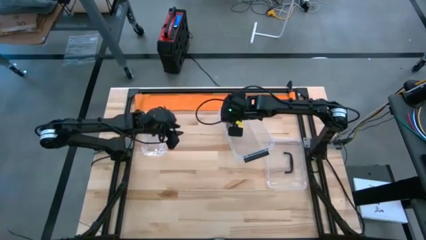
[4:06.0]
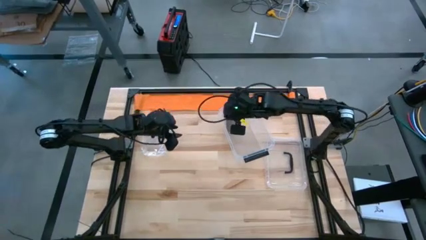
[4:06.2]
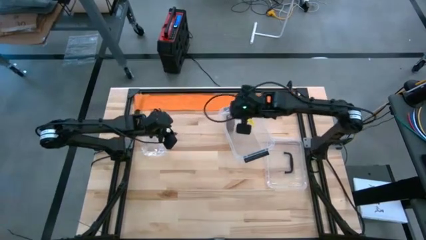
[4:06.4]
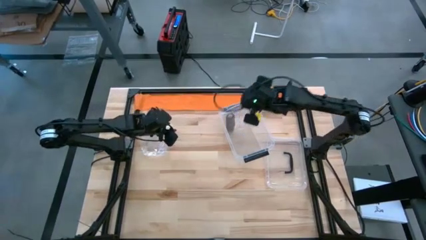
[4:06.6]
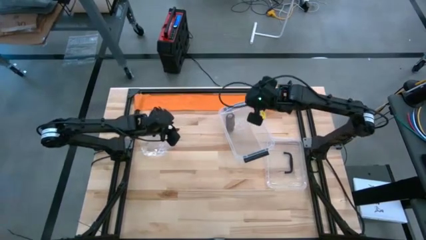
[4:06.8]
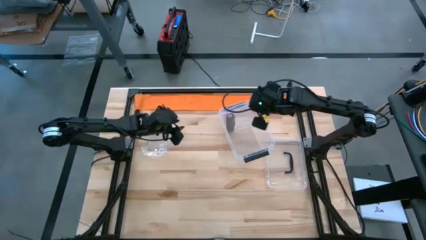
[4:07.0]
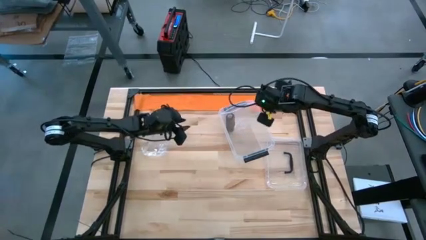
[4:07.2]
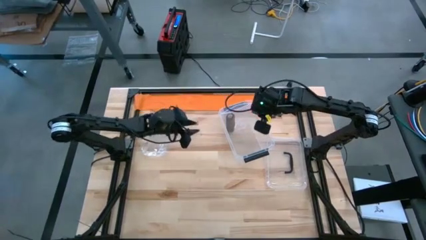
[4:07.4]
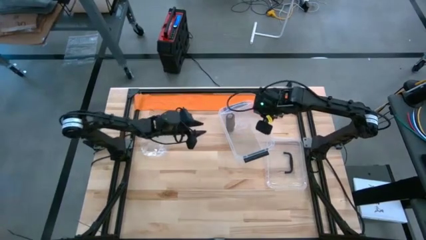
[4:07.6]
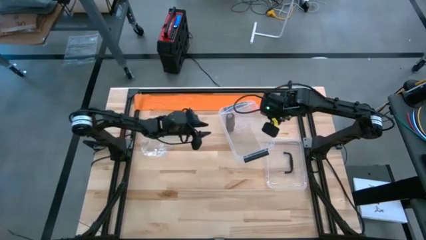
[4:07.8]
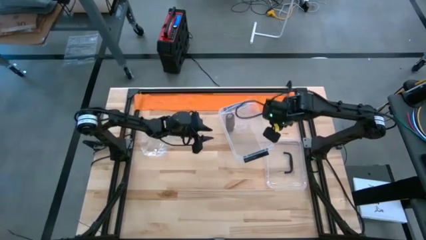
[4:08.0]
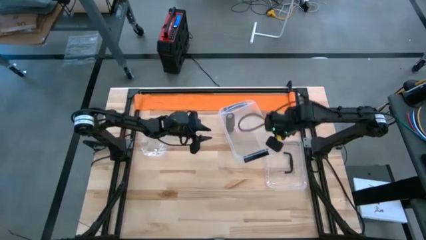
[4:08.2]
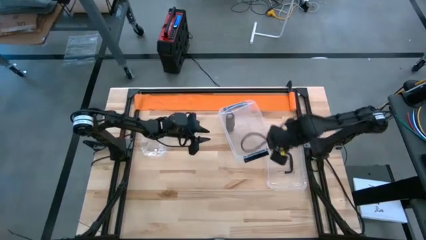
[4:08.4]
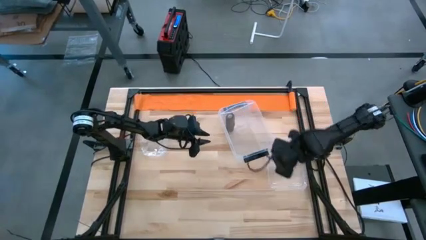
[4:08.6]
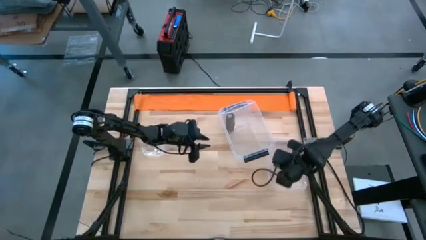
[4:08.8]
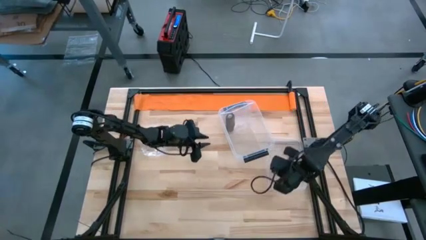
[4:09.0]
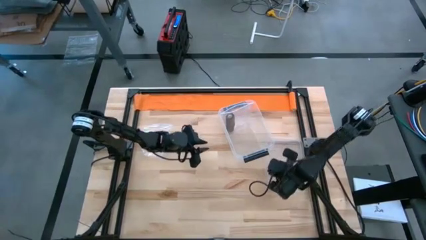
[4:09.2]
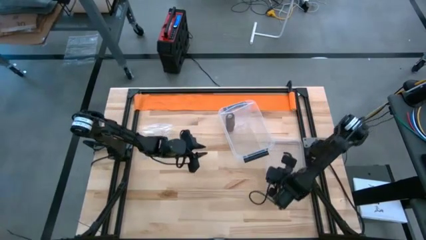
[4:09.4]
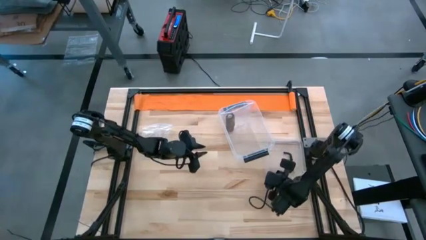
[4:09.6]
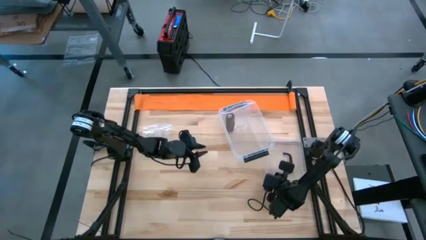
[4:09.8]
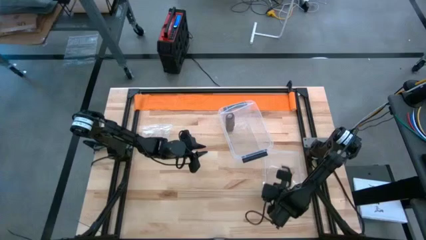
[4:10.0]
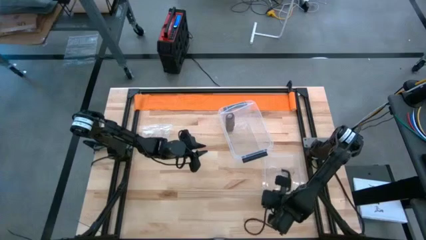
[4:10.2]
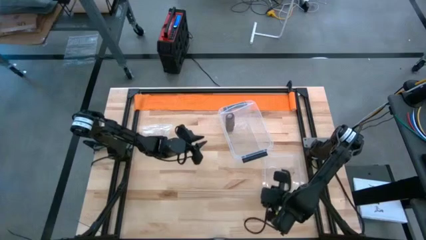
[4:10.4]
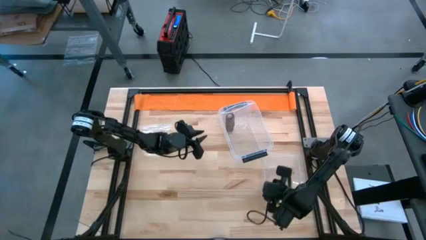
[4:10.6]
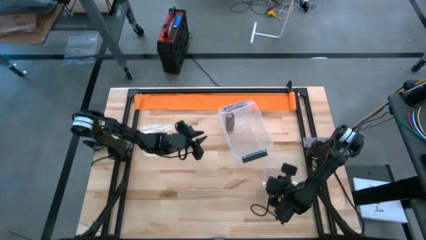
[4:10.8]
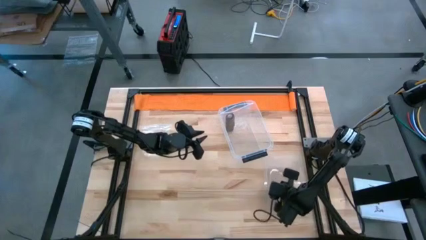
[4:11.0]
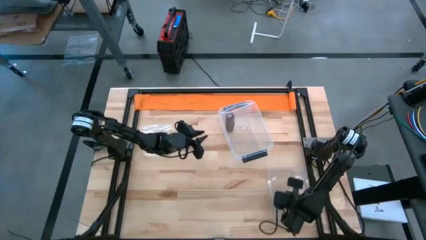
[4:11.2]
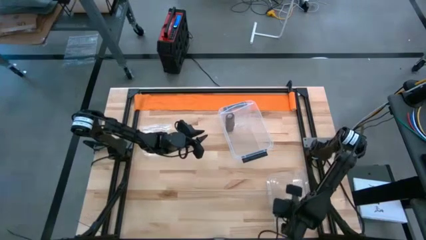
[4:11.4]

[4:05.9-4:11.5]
Task: Roll bandage
Move the transparent lid to the middle right of the table

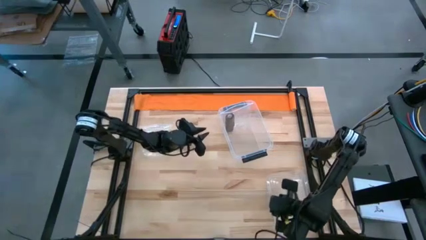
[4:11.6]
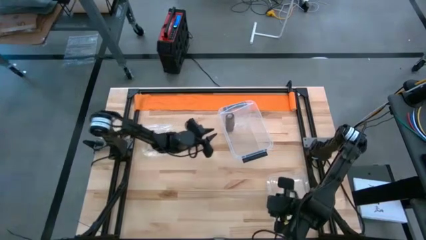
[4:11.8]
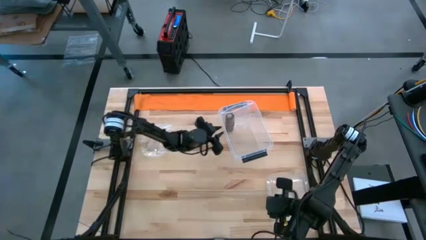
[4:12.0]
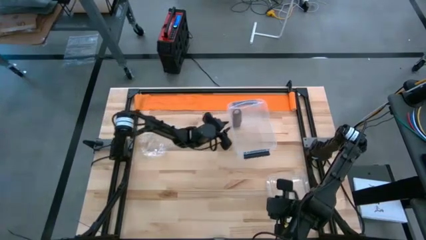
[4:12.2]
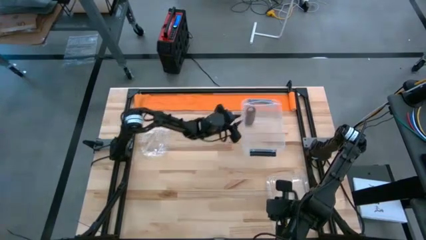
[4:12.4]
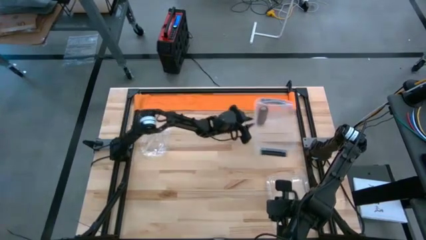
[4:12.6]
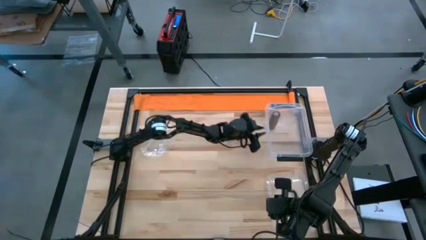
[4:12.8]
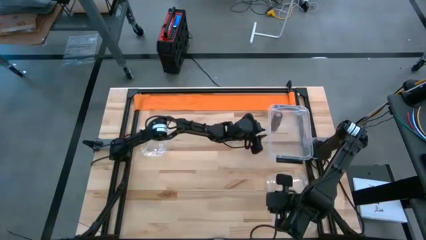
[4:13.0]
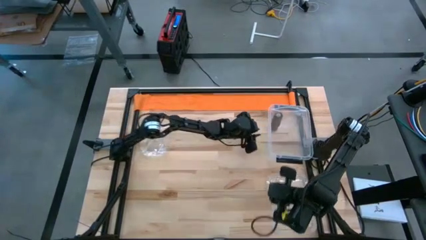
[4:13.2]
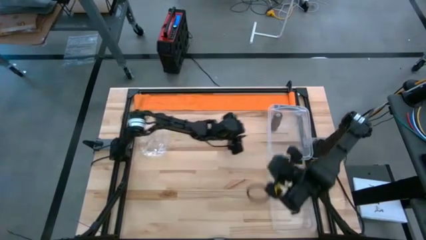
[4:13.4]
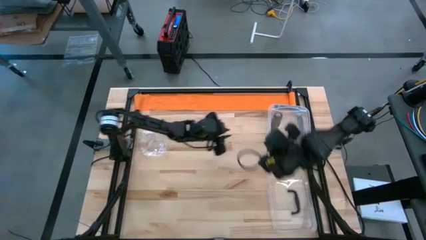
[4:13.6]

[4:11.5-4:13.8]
Move the transparent container to the top right of the table

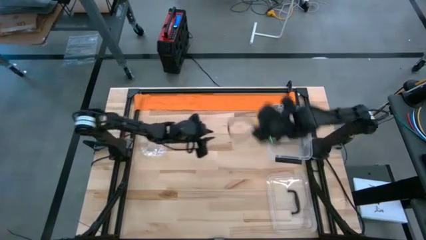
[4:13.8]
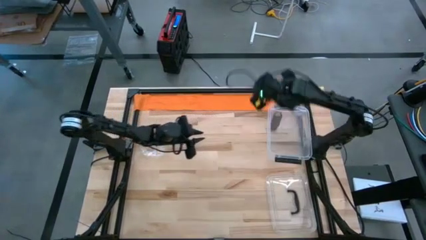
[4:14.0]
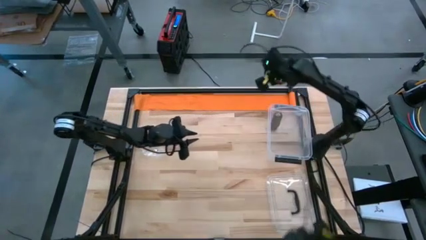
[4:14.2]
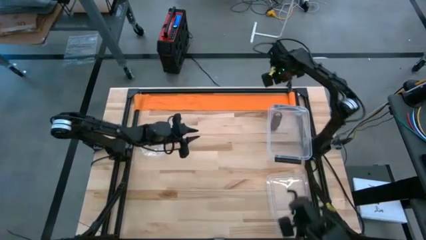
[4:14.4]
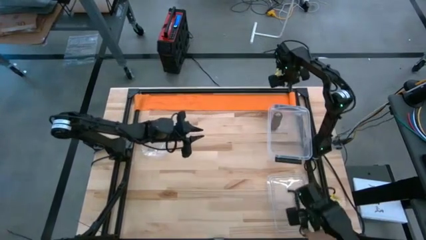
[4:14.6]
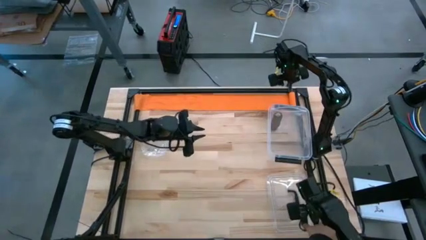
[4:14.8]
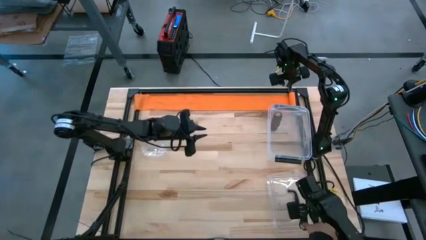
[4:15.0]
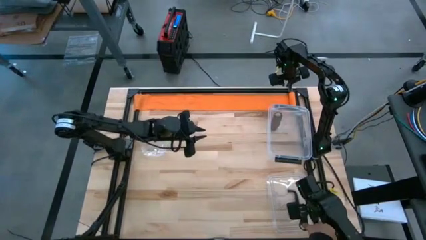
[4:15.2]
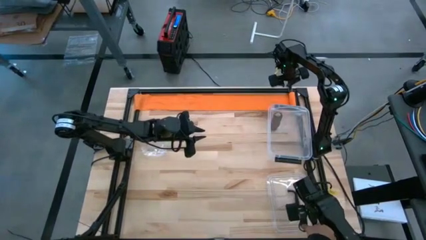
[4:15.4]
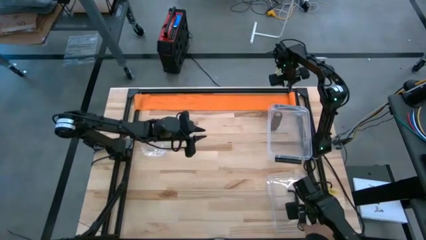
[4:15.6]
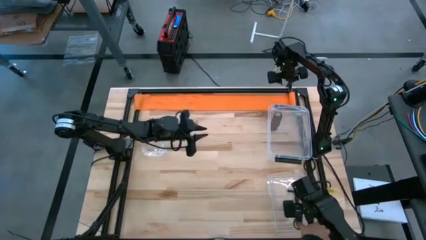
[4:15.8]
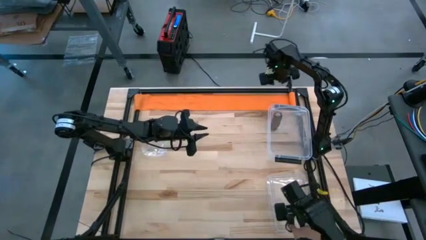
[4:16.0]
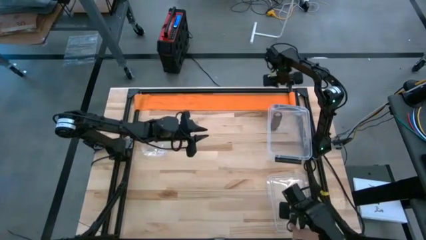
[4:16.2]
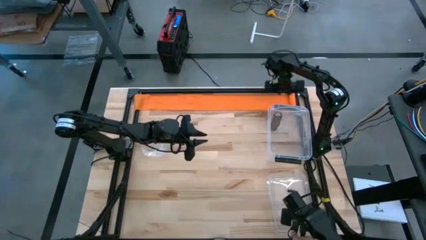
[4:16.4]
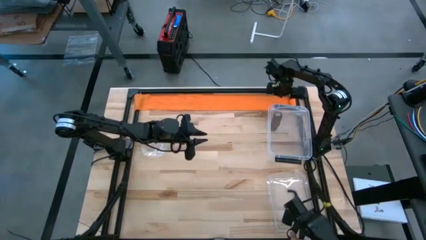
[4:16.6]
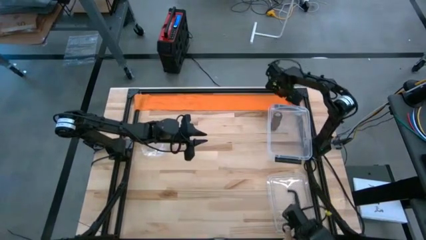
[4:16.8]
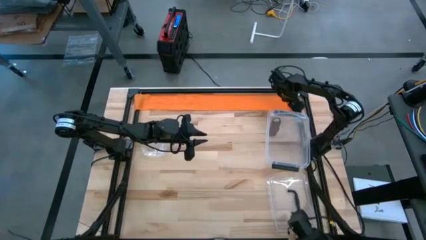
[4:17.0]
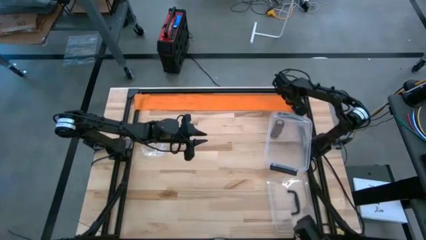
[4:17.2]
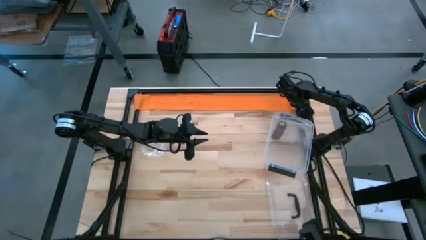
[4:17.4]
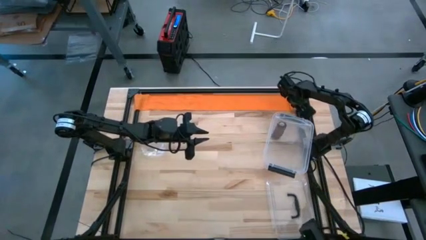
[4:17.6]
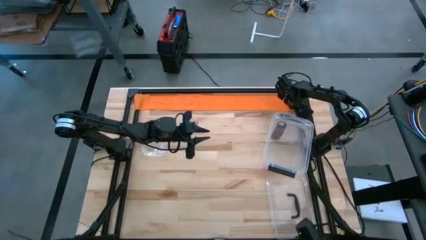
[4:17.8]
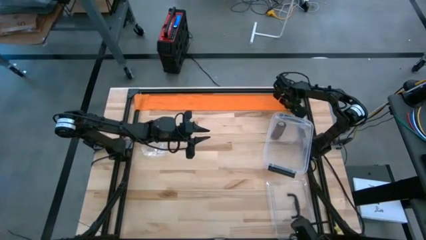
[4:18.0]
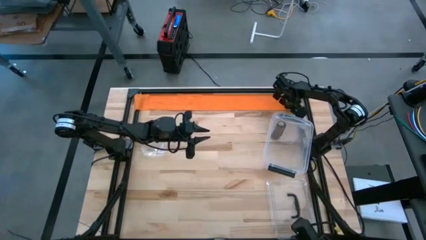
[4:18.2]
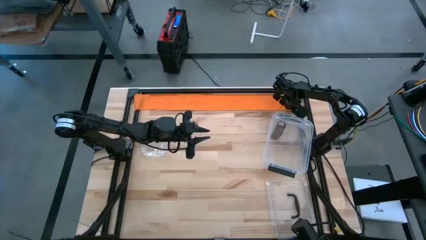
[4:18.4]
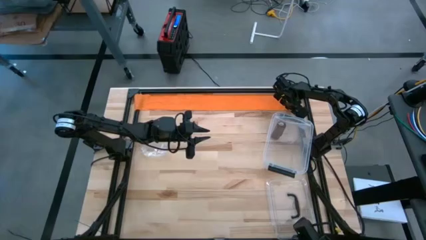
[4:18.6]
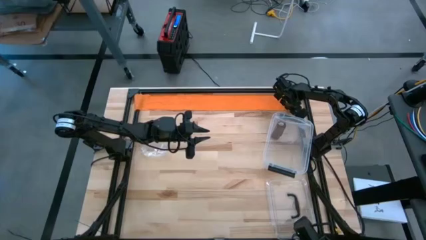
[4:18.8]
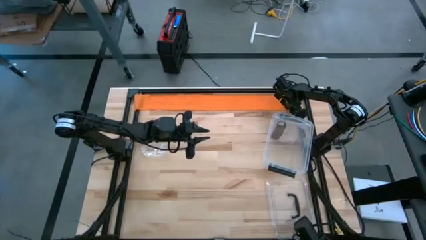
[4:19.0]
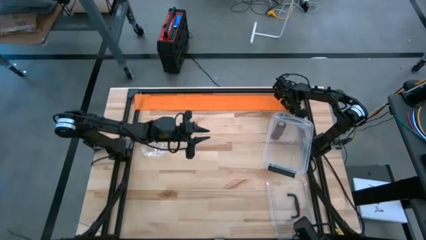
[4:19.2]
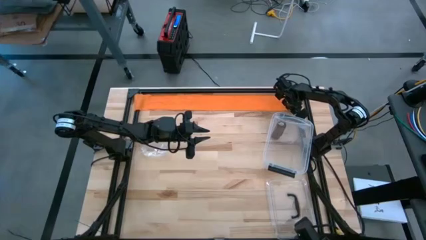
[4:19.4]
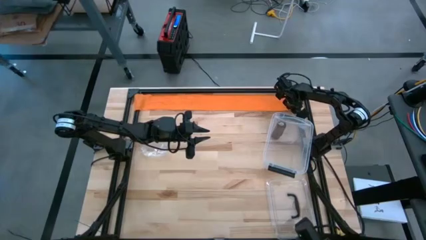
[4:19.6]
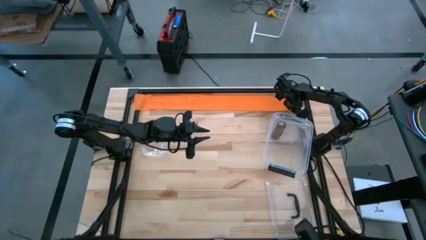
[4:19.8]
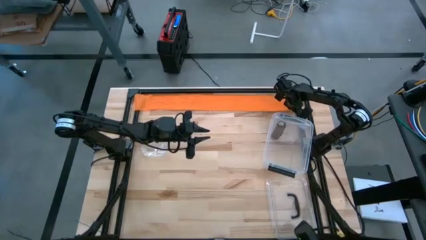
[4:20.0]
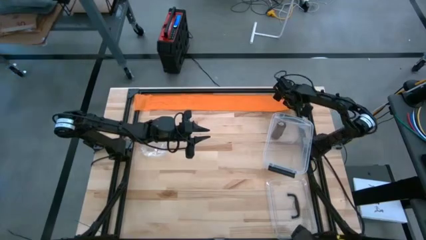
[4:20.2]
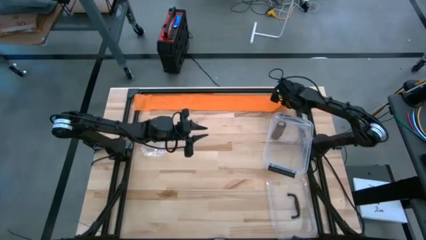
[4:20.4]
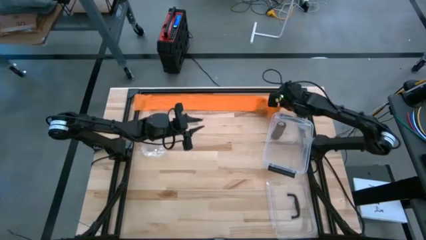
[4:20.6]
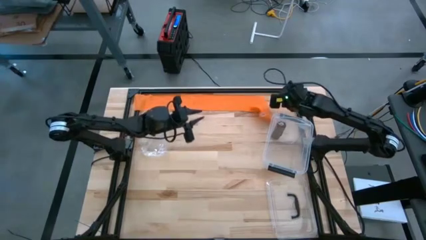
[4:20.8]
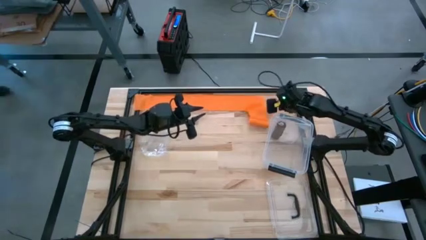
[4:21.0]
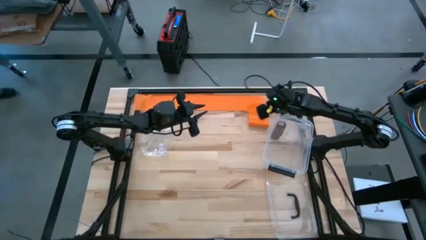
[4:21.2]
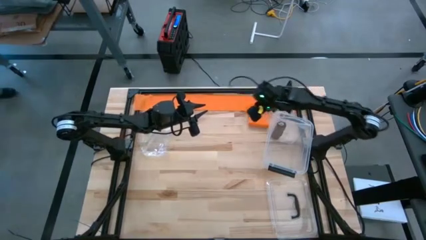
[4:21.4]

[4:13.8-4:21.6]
Roll the orange bandage
